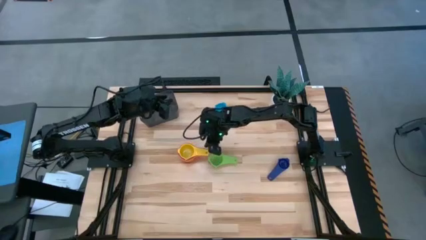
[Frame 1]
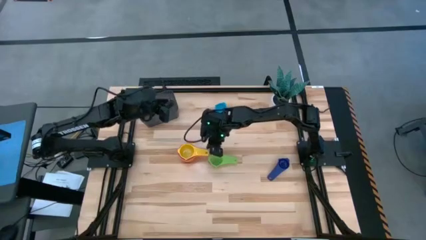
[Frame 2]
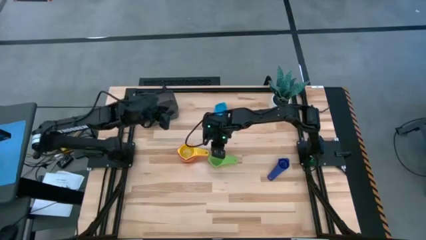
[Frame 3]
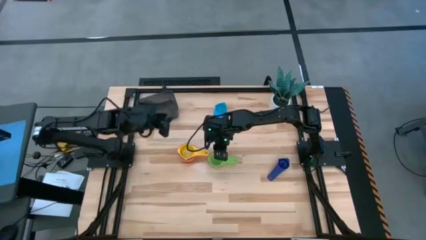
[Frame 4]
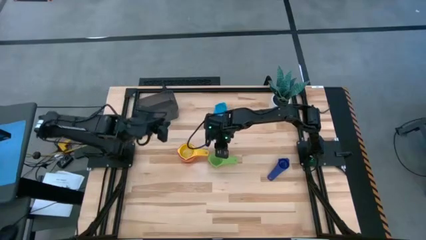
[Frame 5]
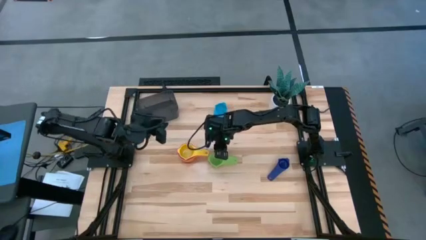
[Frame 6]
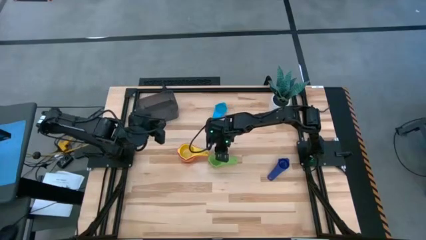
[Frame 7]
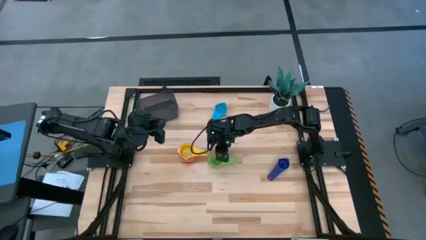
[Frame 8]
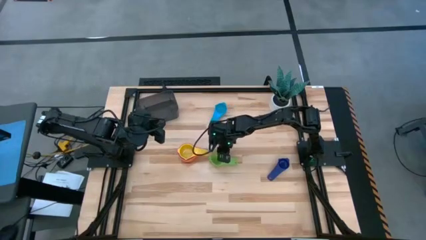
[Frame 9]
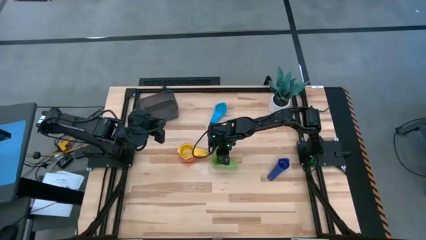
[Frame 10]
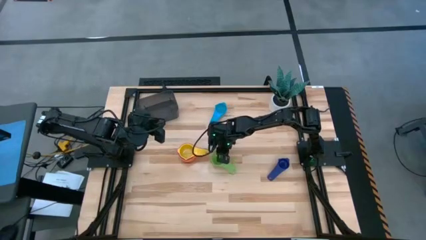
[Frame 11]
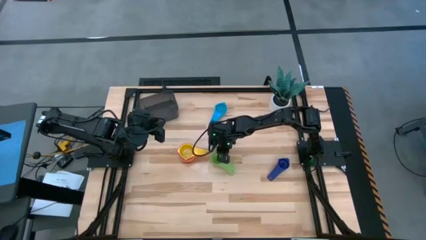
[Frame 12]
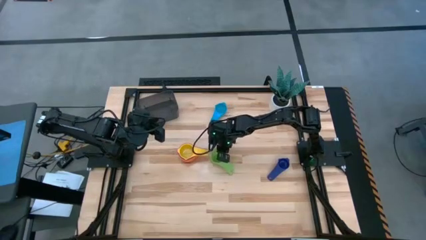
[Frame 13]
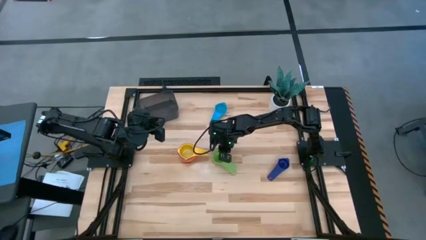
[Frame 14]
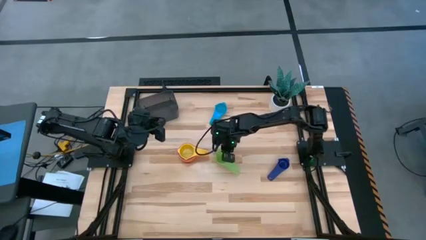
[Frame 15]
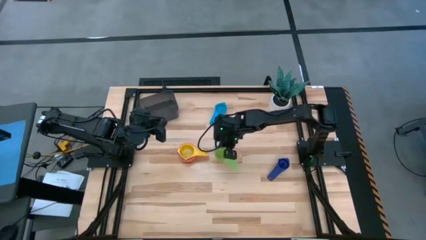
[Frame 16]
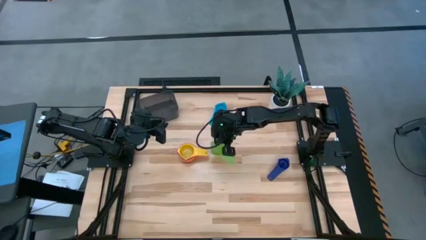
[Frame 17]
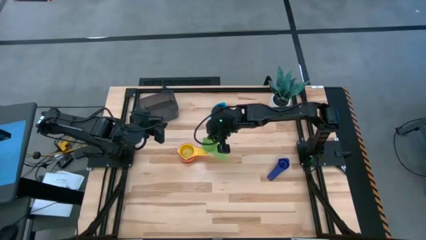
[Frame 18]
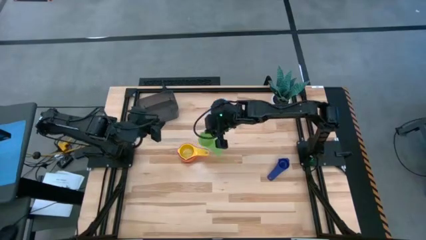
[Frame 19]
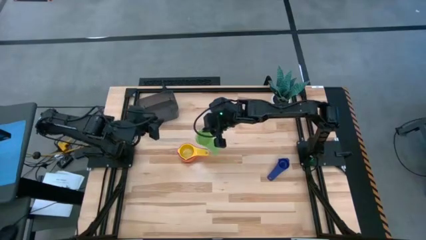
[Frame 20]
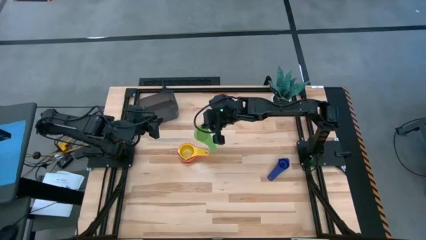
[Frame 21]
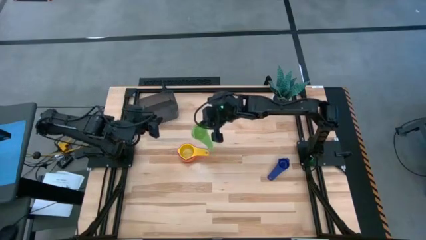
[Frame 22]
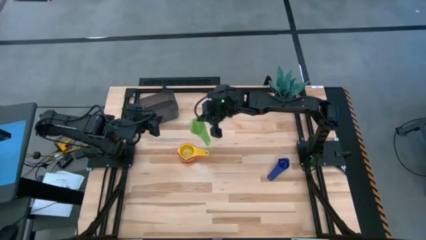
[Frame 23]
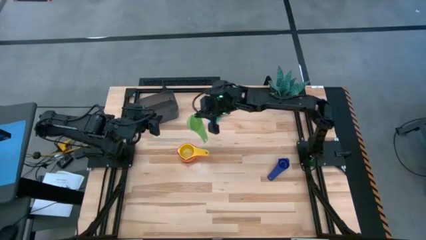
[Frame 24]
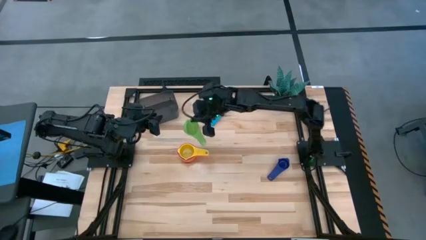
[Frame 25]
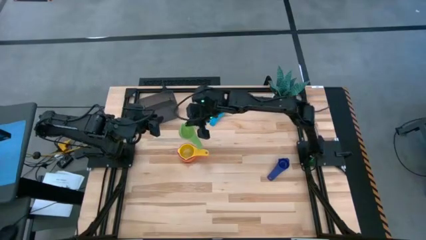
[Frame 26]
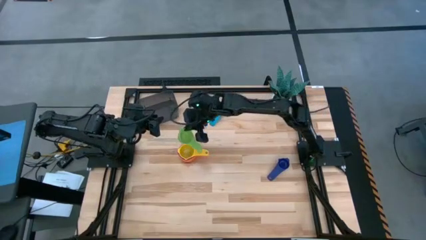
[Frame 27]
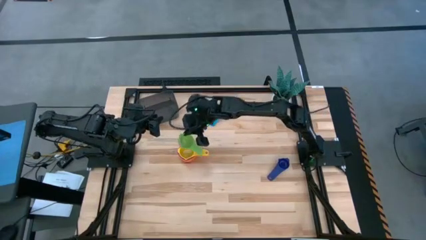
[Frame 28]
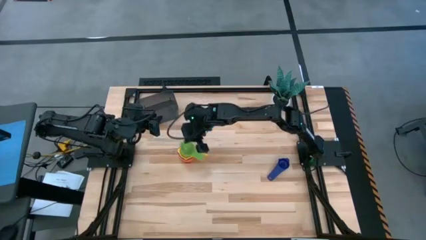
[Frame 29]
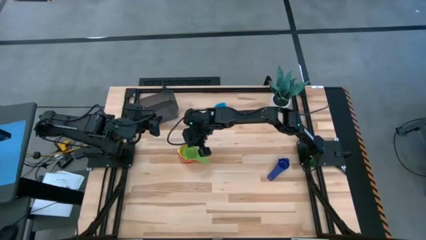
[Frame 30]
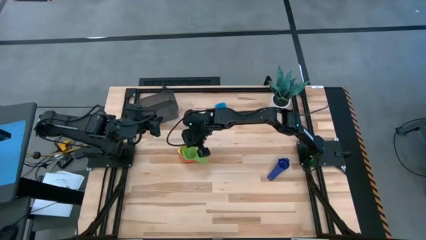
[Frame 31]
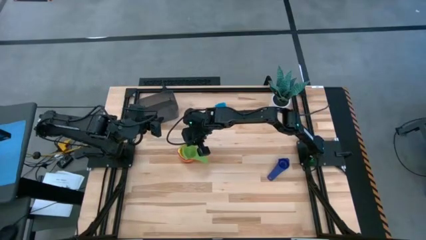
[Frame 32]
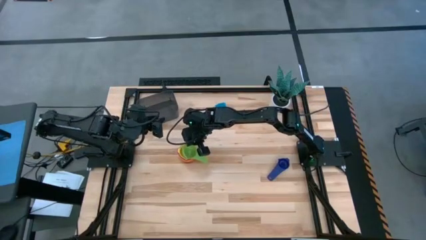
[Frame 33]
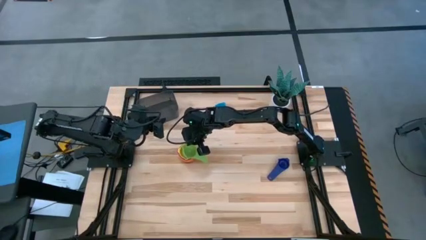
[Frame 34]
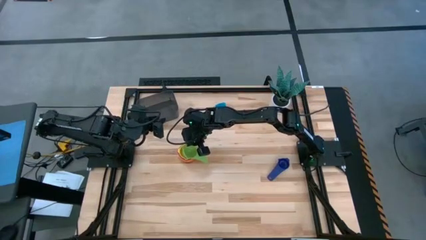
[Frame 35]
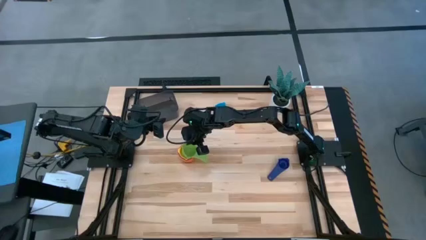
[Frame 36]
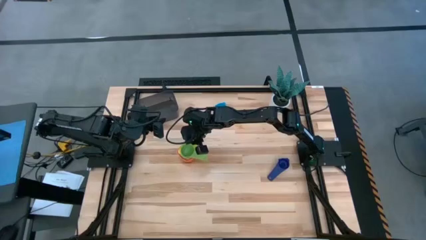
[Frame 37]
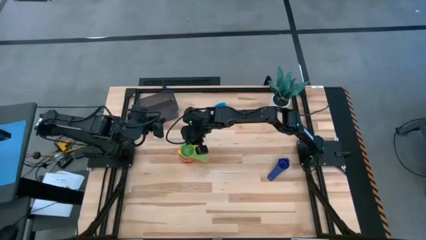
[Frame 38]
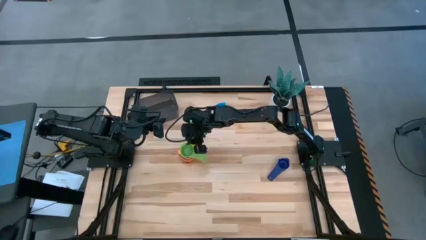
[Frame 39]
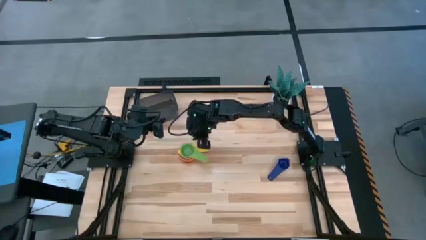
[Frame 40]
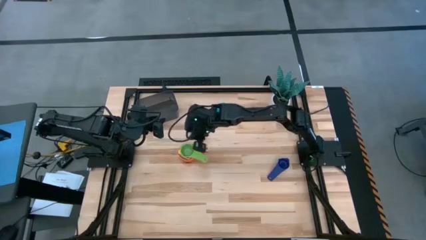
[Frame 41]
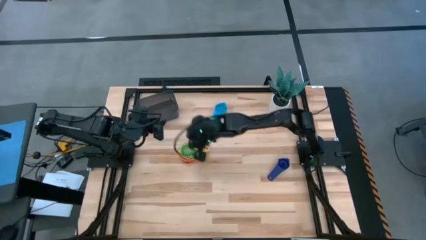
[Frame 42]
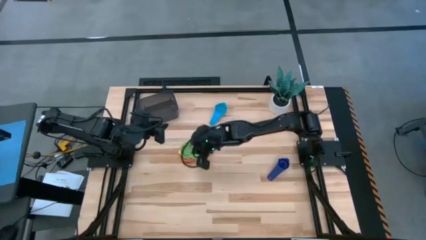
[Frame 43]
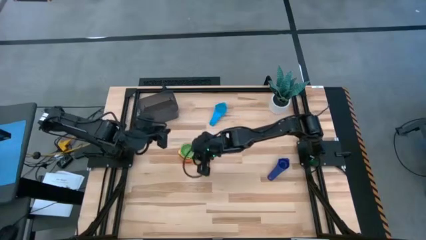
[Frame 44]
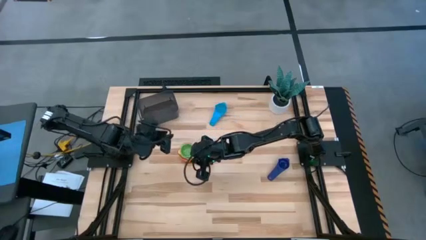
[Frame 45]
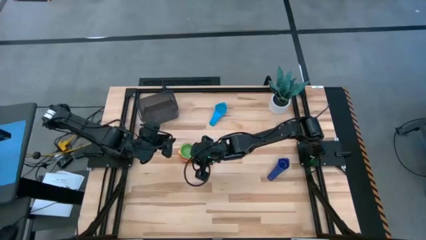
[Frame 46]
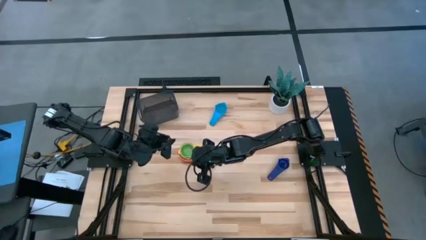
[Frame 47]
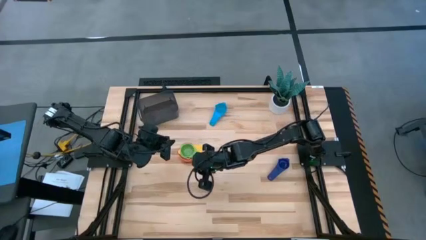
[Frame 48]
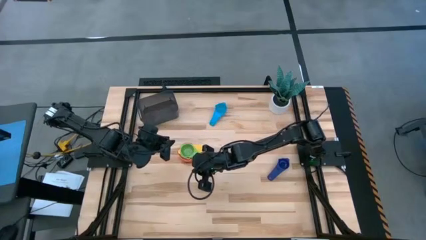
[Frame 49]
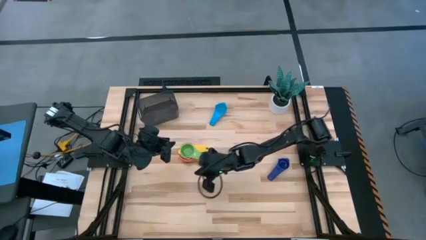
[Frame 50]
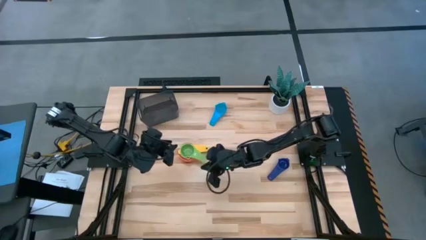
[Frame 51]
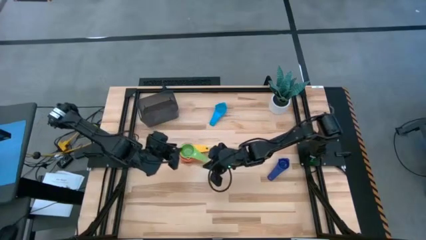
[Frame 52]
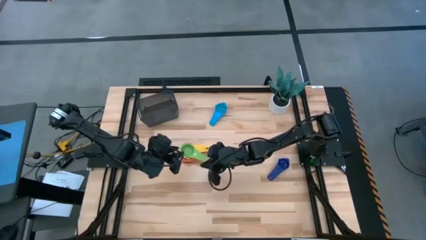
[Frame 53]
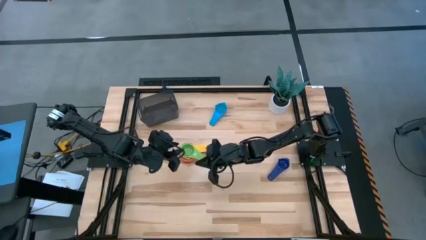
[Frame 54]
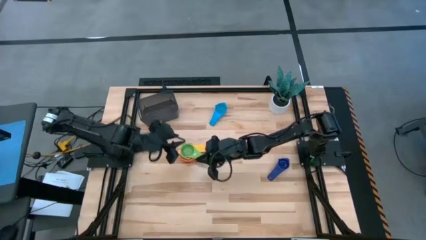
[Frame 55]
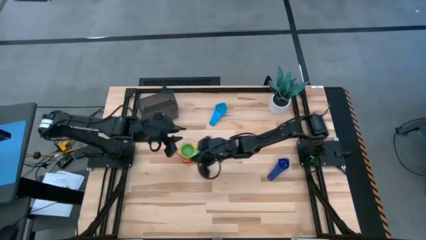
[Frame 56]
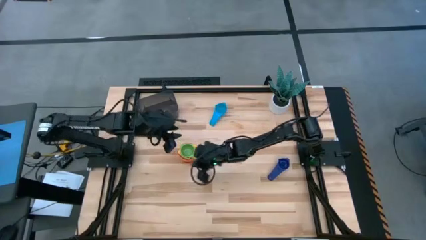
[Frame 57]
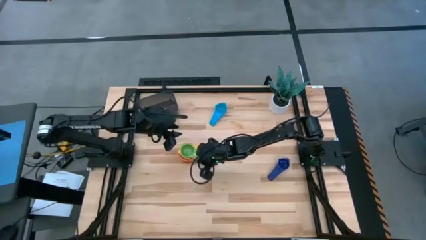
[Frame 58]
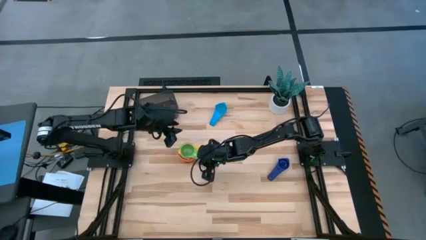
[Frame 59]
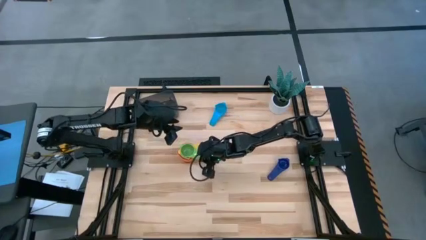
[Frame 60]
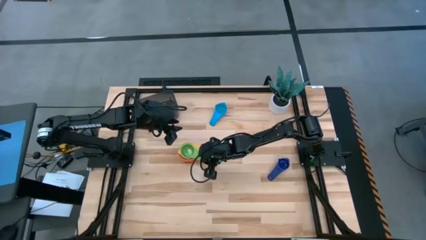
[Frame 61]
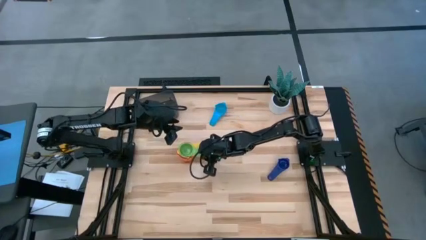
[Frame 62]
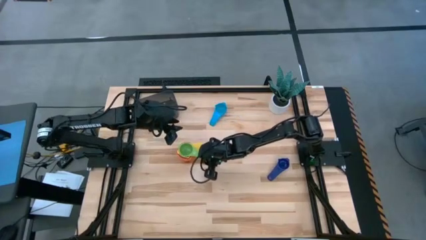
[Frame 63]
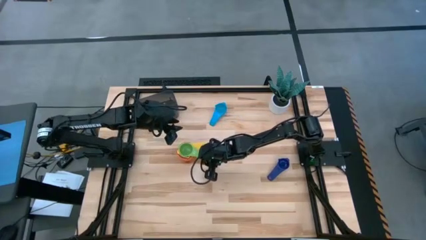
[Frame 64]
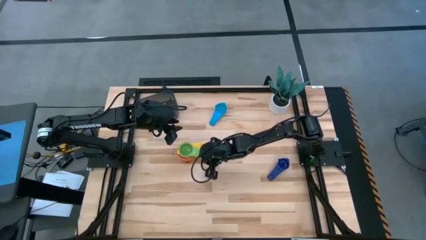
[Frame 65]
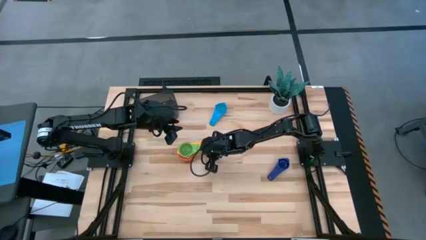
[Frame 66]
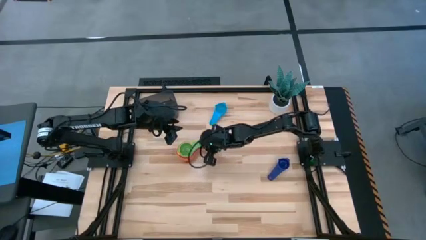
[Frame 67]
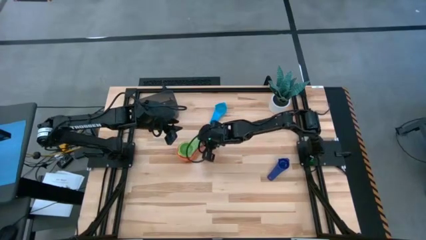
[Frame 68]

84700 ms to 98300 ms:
Task: Nest measuring cups in basket
Stack the green measuring cup on top of the yellow measuring cup

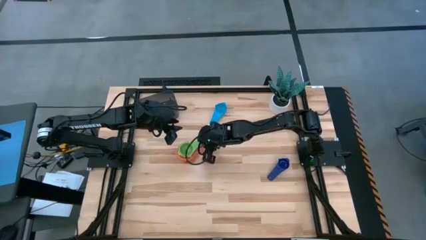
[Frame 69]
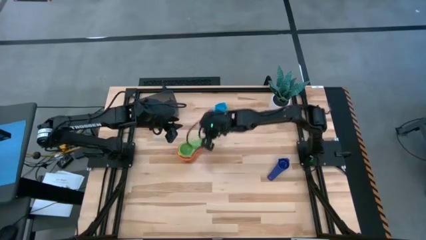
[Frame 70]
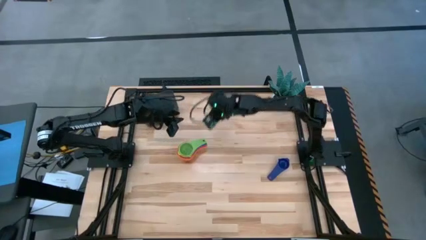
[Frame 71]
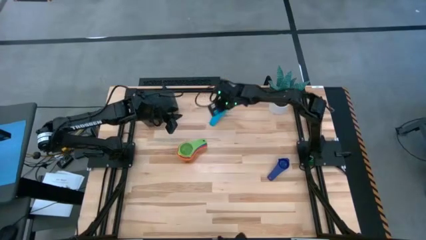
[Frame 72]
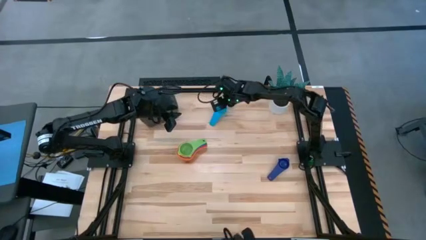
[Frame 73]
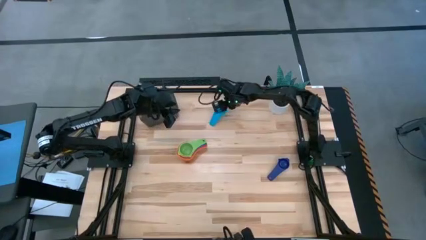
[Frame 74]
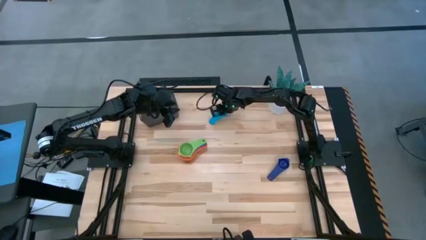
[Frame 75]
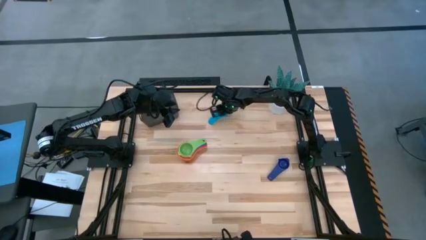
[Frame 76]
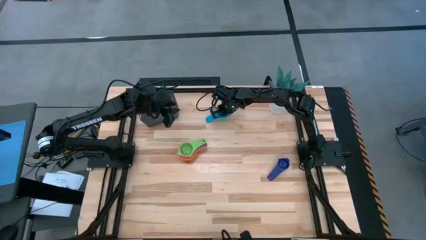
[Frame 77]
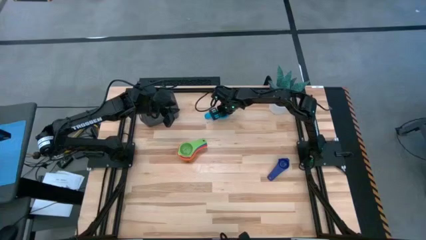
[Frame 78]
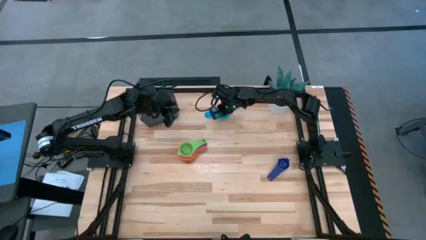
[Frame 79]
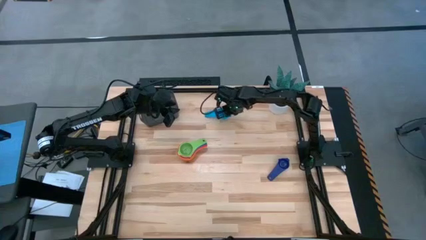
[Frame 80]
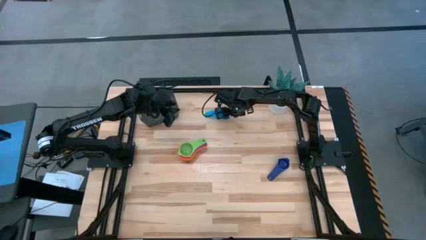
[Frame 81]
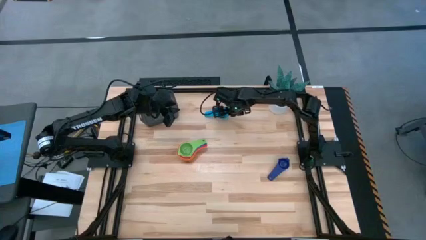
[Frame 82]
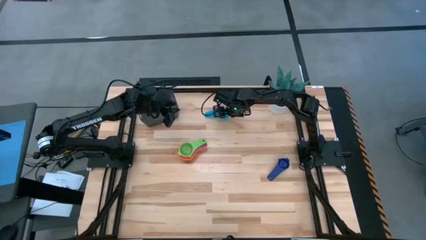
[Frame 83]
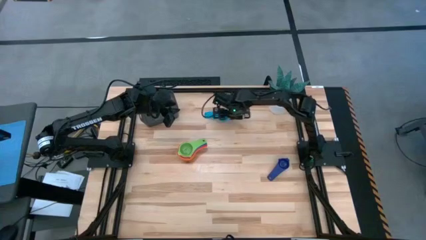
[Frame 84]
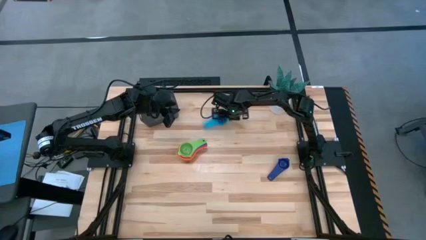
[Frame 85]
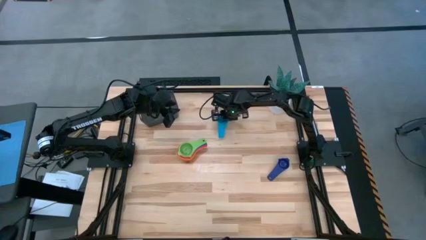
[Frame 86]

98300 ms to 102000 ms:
Stack the light blue measuring cup on top of the green measuring cup
